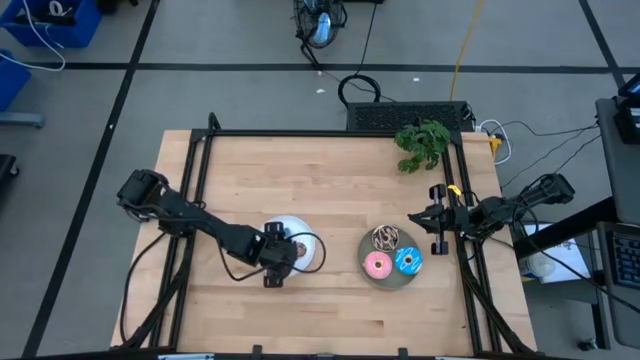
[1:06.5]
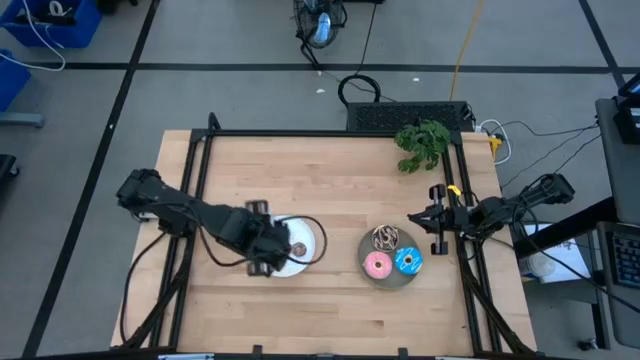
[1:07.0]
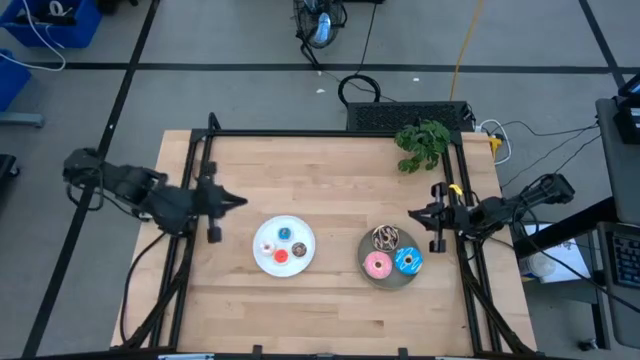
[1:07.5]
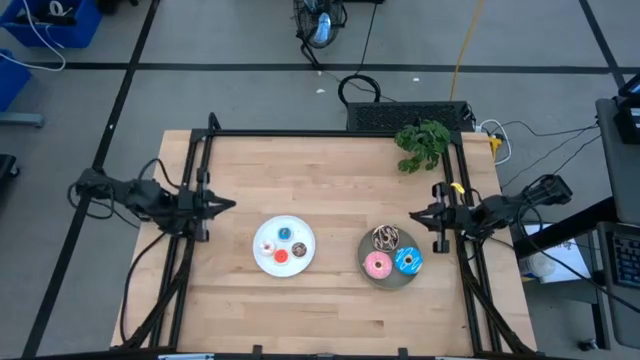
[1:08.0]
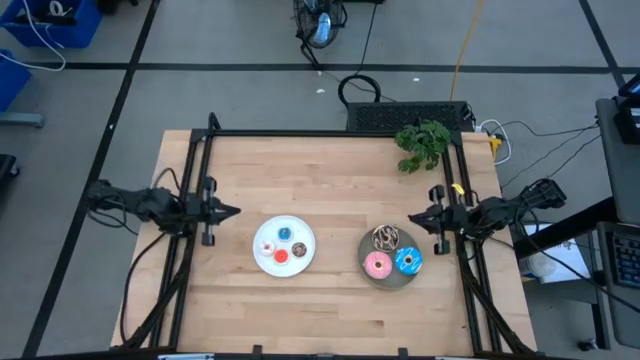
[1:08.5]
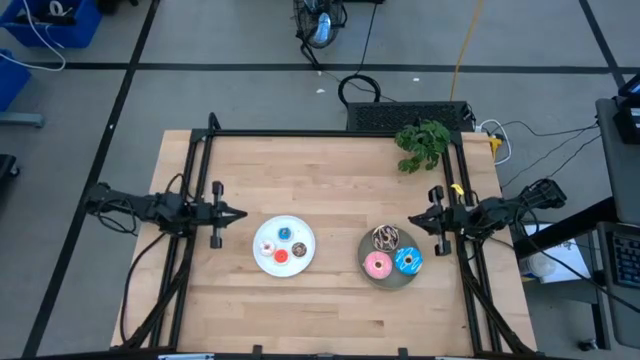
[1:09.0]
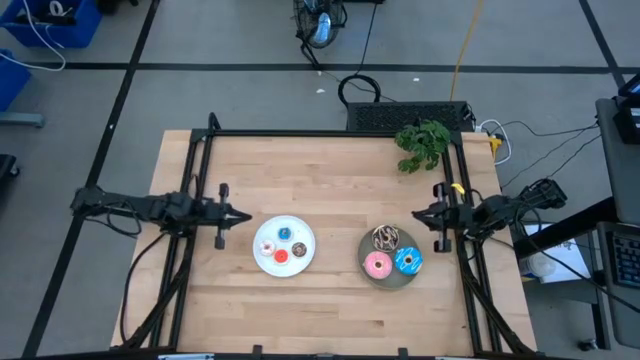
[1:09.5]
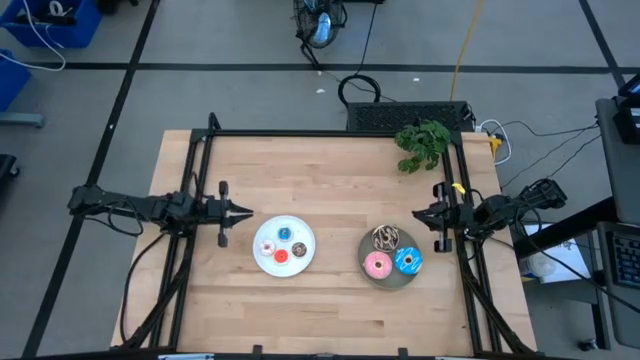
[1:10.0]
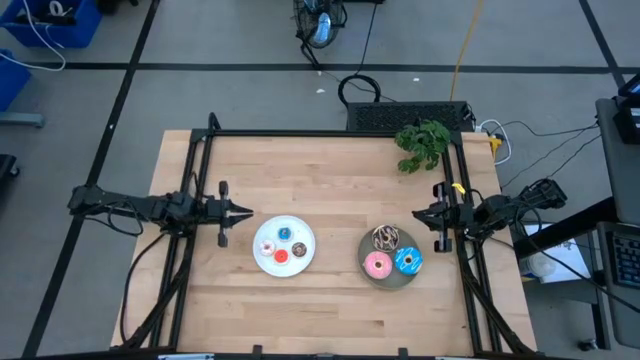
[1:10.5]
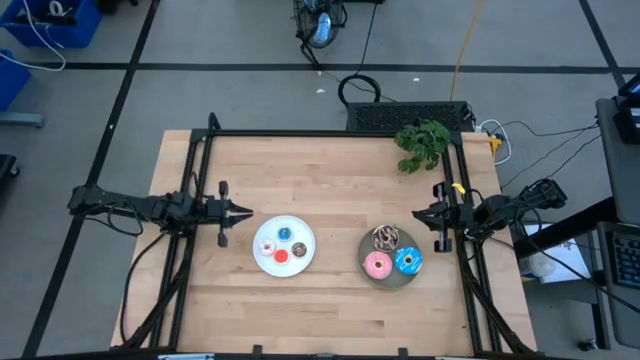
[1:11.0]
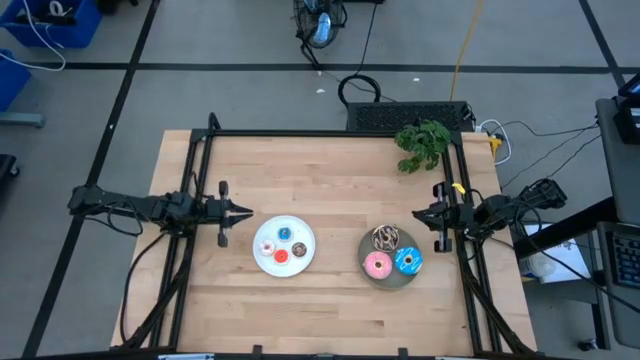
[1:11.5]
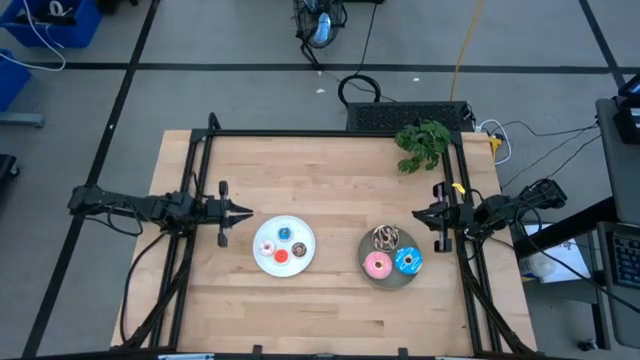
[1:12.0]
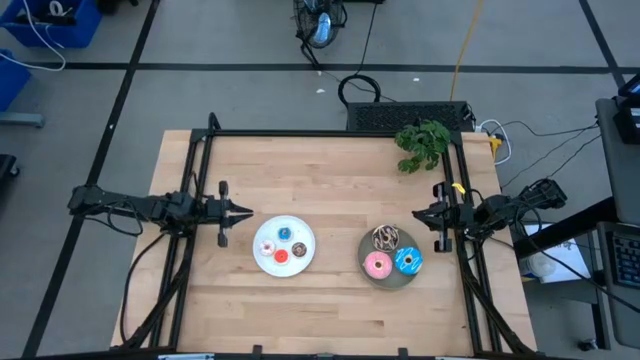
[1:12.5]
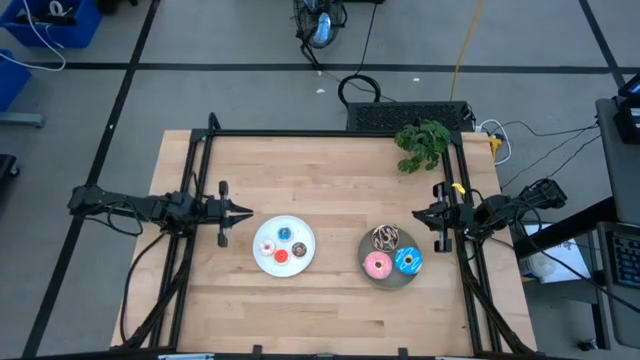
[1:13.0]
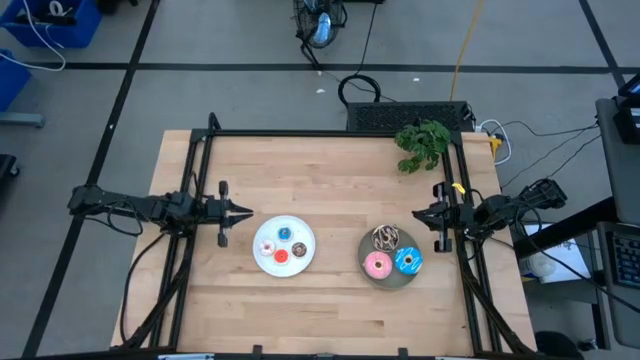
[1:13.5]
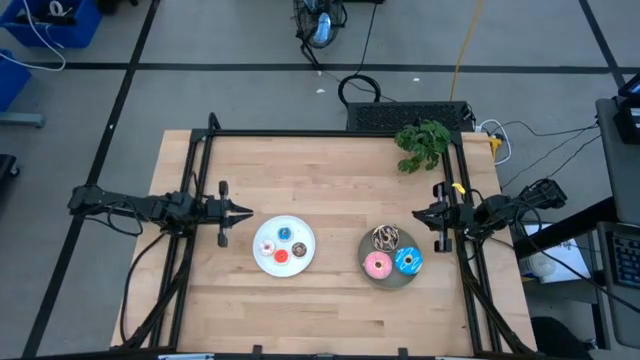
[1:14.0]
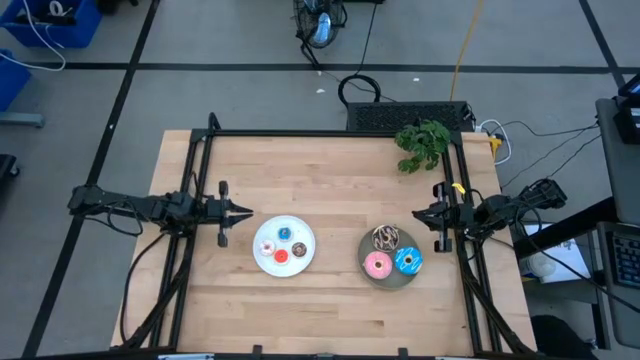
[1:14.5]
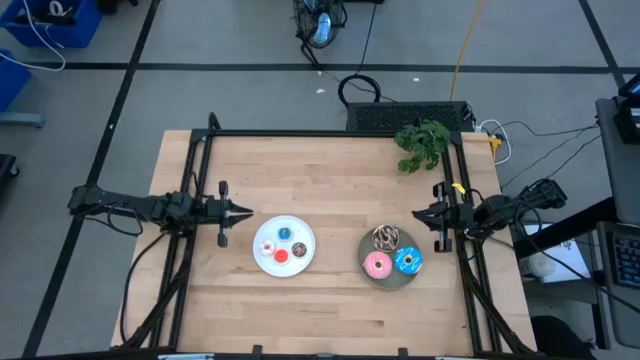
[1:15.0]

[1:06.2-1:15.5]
Task: Pick & Place donuts
Return to Home Position

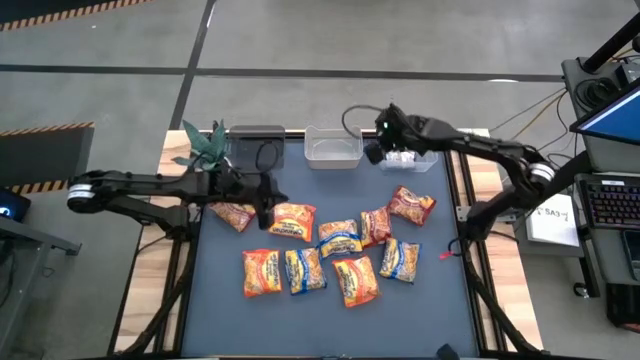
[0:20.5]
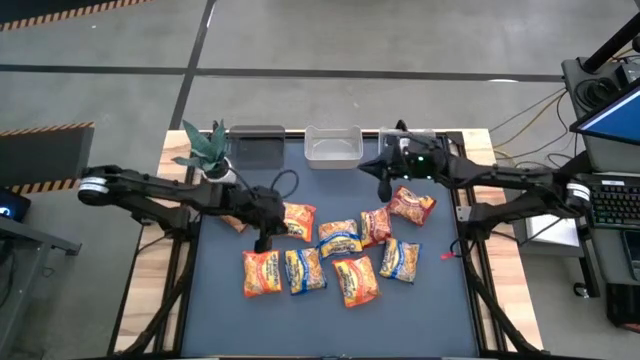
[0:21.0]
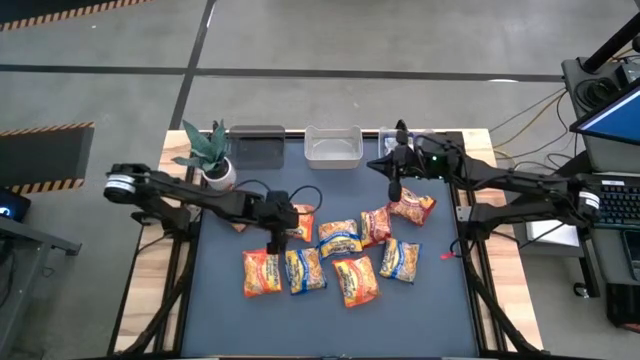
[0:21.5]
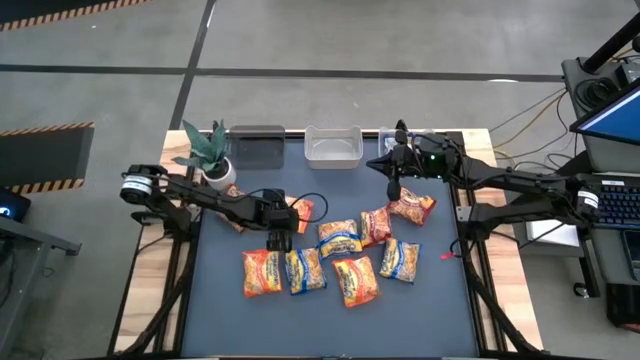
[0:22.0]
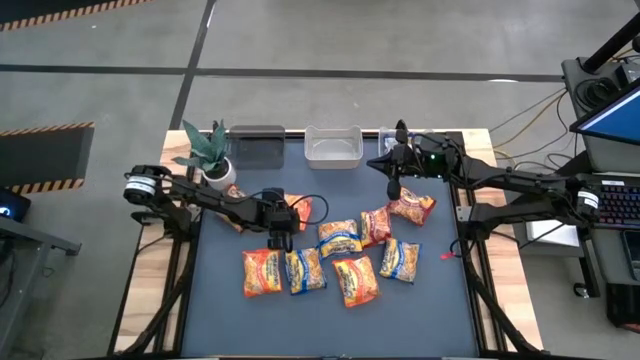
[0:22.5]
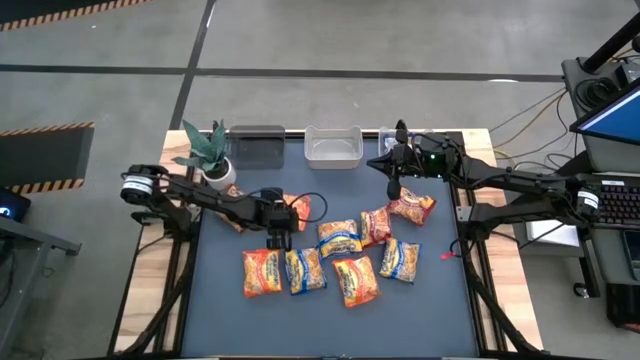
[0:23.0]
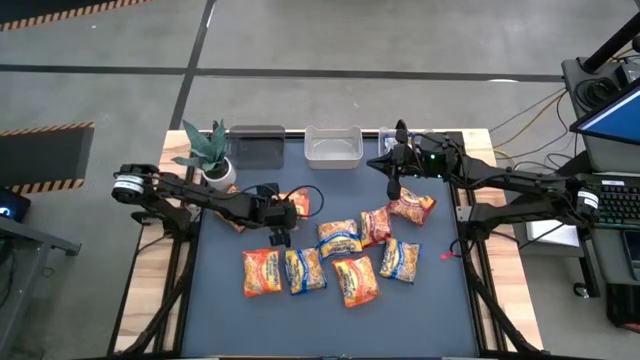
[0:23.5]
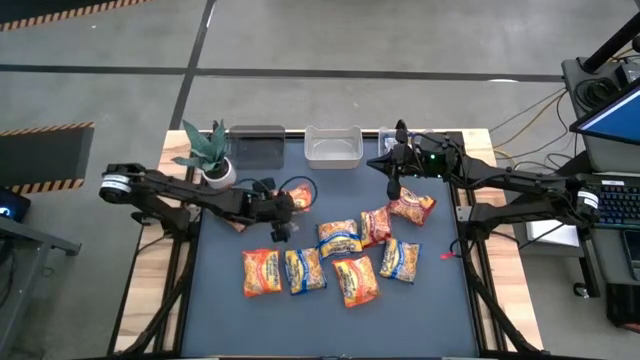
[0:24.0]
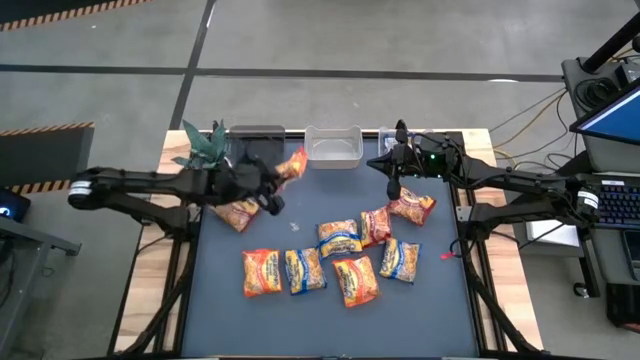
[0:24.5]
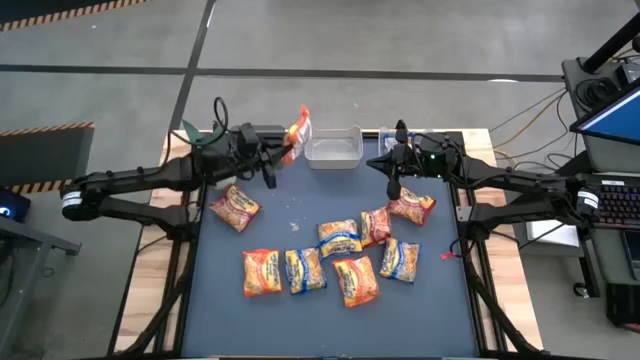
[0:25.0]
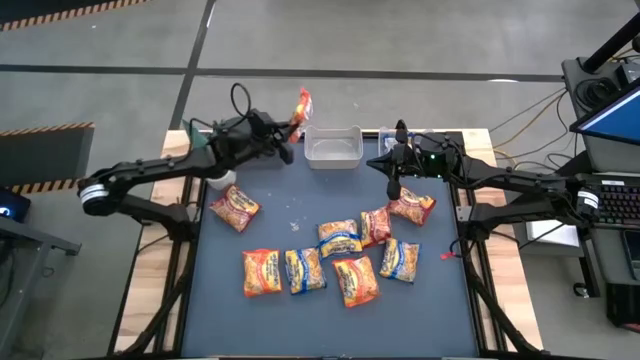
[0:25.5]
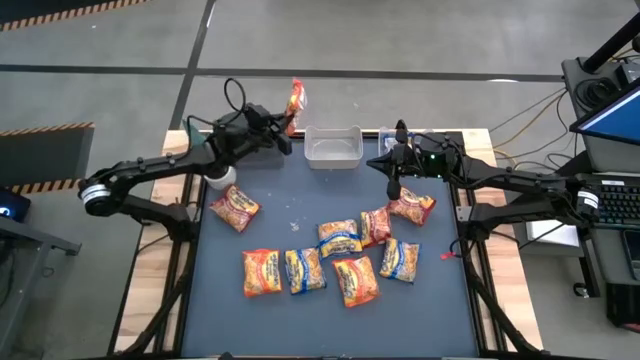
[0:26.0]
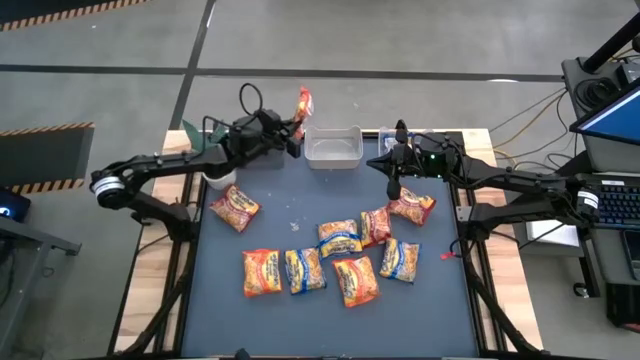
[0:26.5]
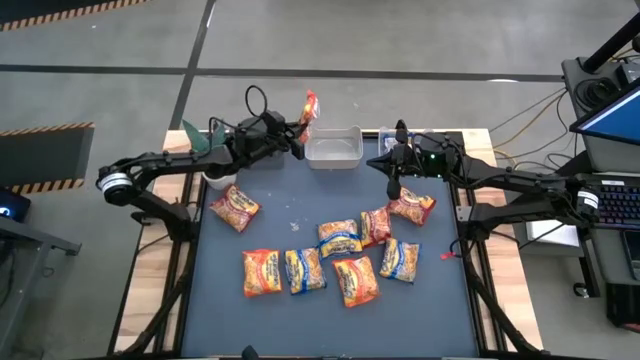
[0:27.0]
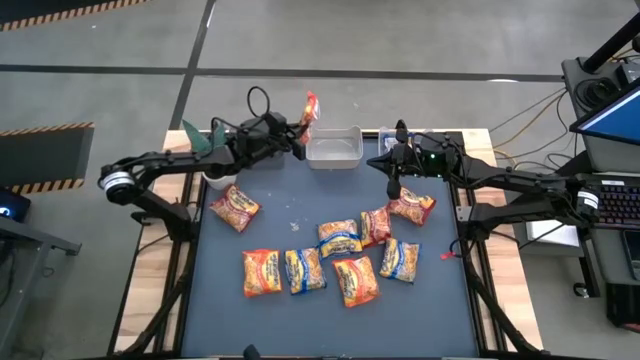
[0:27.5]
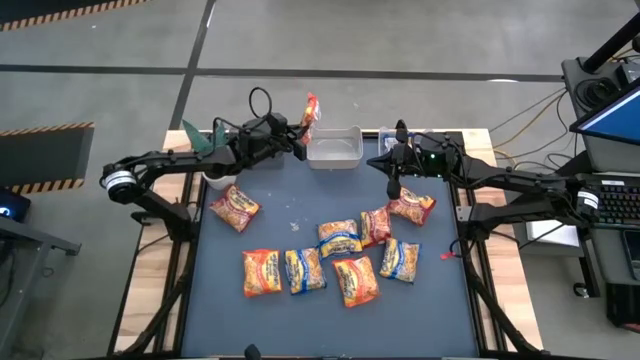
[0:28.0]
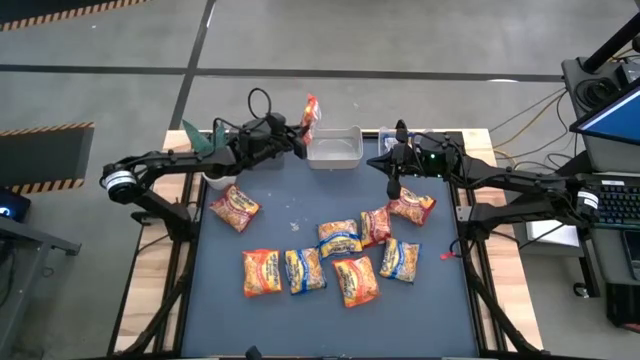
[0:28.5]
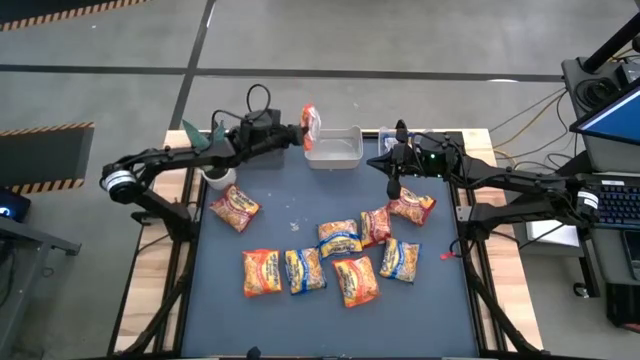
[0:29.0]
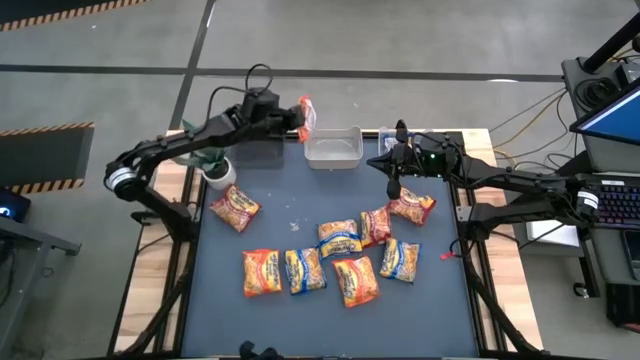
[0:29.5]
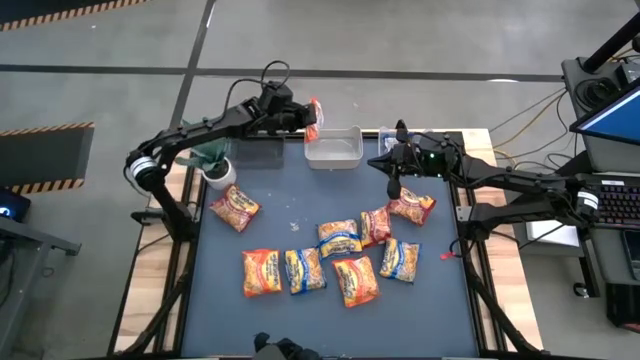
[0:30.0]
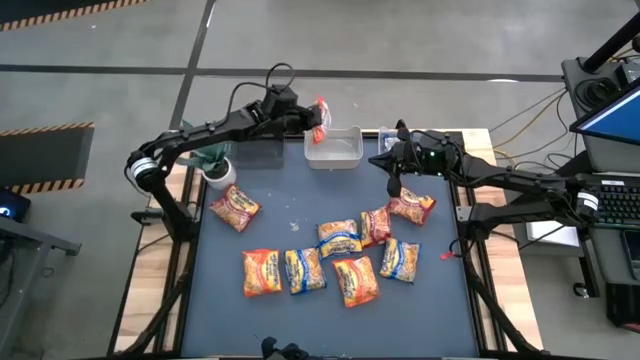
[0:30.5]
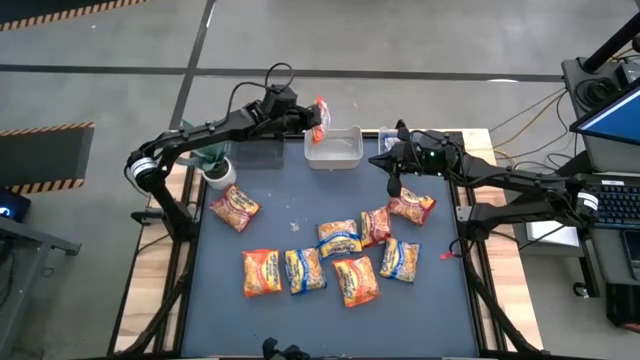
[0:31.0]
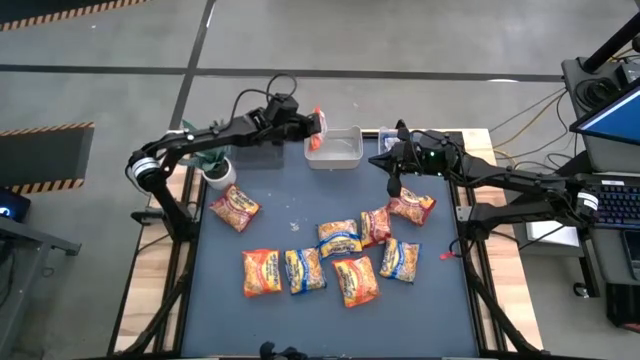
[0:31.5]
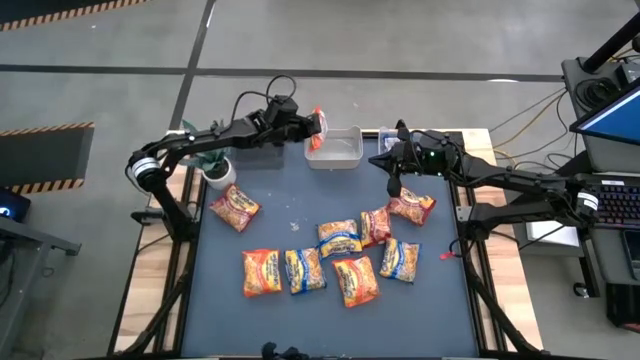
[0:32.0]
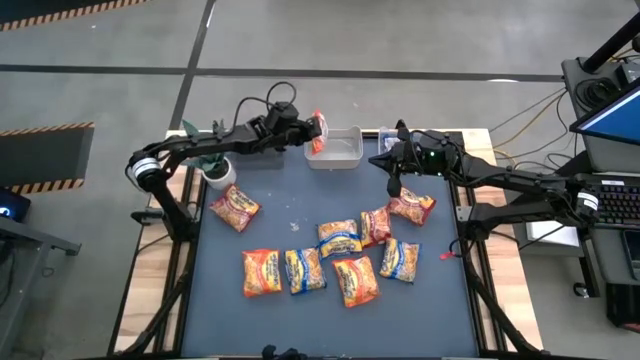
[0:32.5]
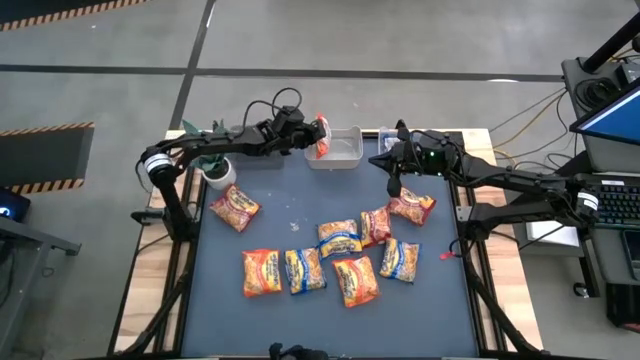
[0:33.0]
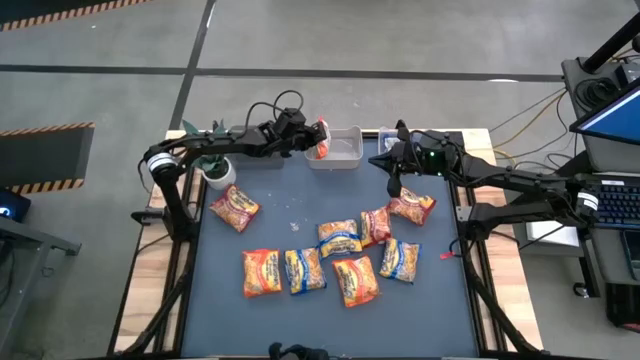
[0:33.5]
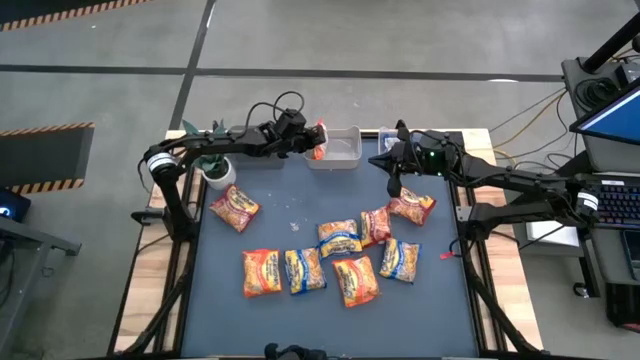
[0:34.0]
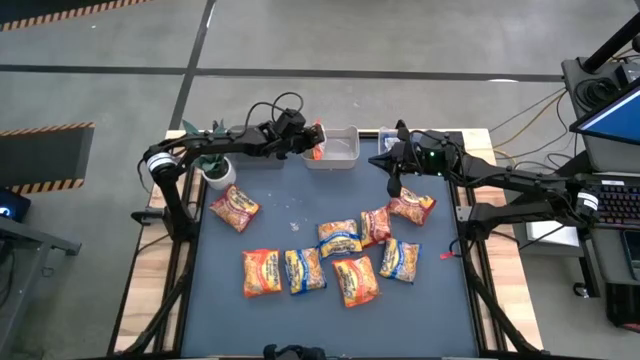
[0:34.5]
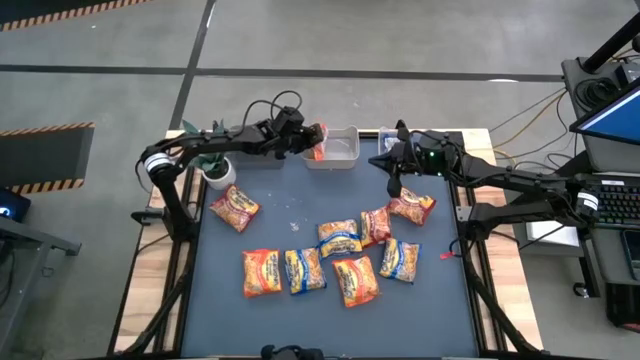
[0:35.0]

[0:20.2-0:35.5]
Task: Sort Maruchan noodles
Put the top orange noodle pack into the white bin
